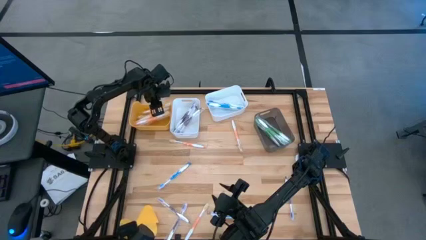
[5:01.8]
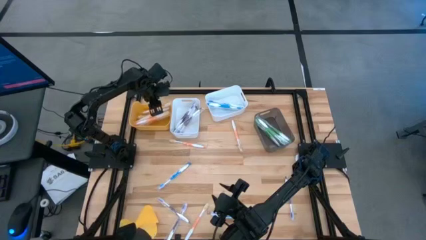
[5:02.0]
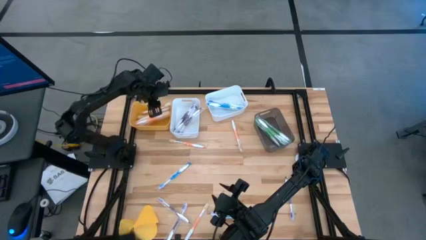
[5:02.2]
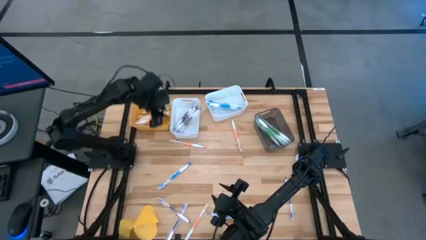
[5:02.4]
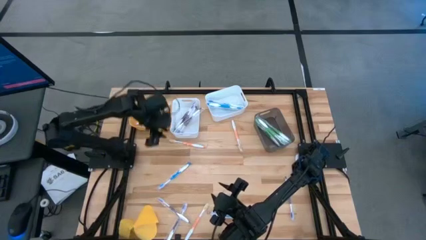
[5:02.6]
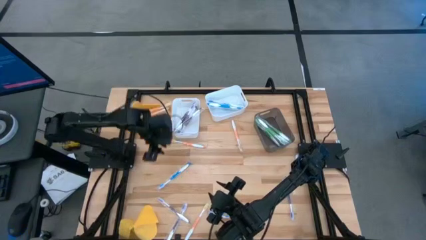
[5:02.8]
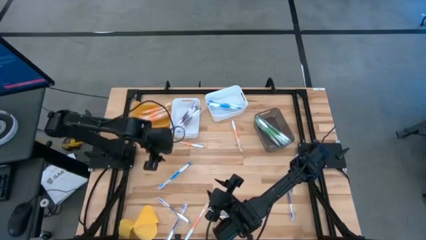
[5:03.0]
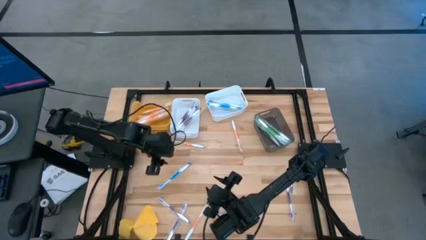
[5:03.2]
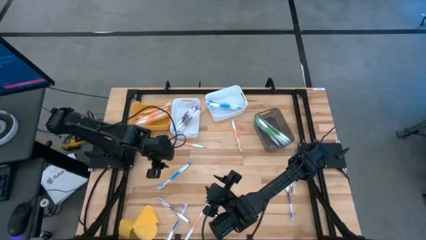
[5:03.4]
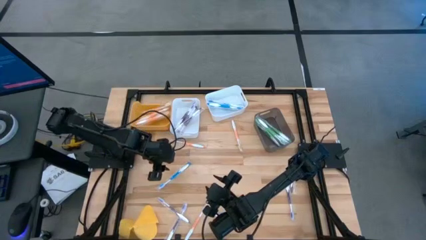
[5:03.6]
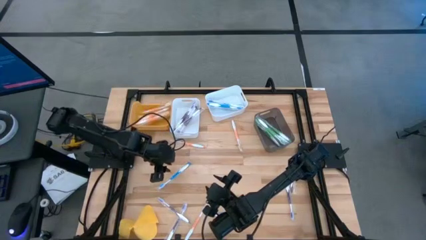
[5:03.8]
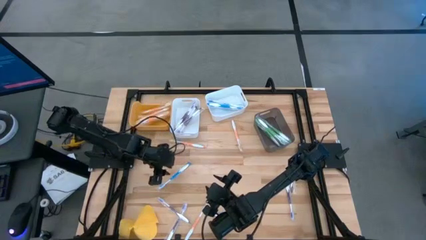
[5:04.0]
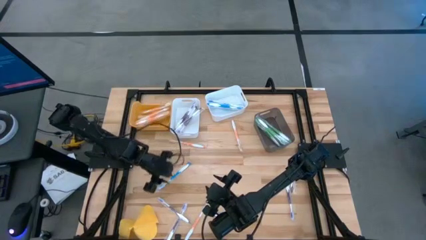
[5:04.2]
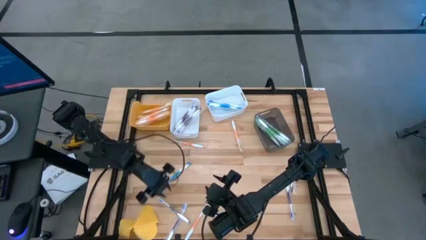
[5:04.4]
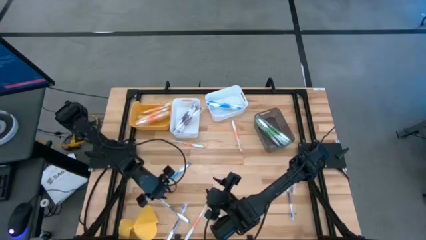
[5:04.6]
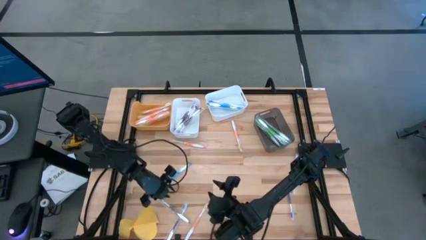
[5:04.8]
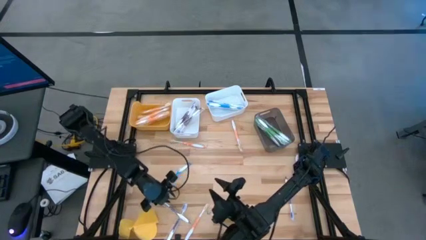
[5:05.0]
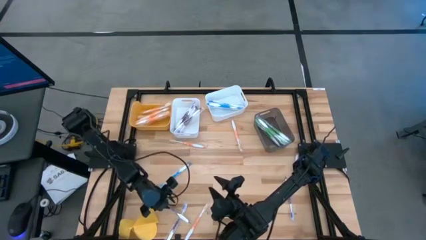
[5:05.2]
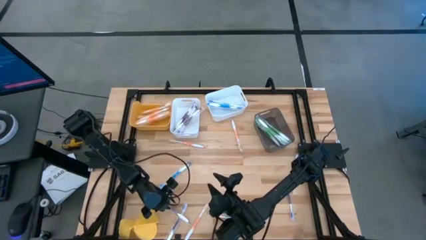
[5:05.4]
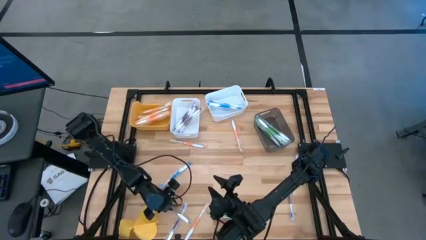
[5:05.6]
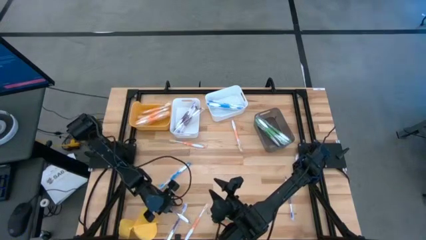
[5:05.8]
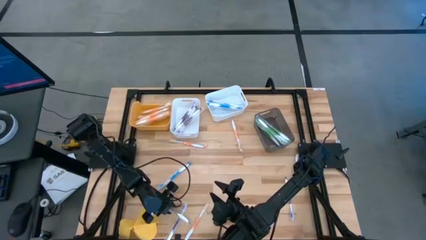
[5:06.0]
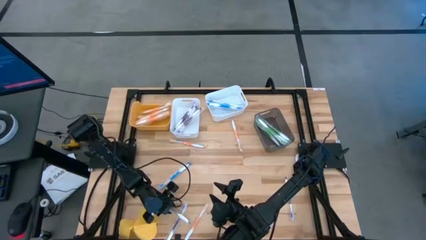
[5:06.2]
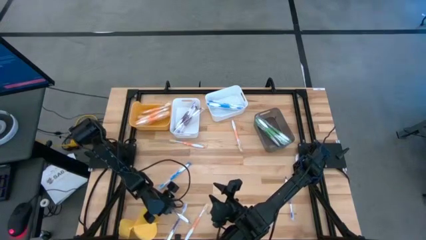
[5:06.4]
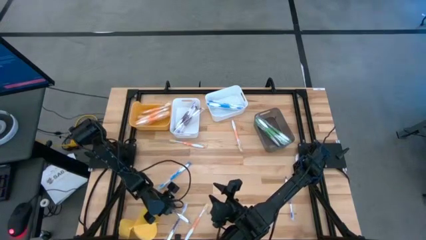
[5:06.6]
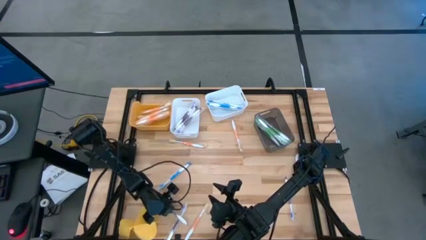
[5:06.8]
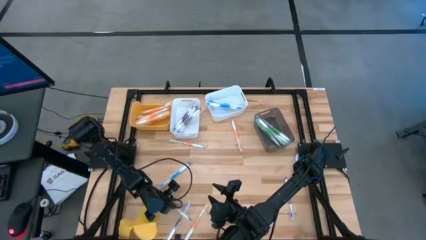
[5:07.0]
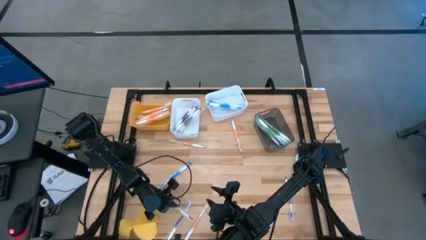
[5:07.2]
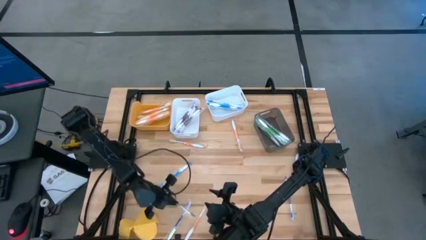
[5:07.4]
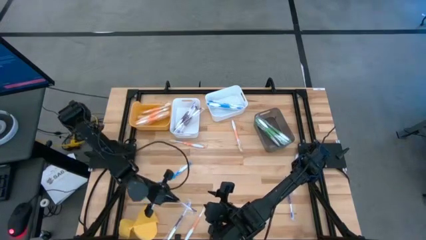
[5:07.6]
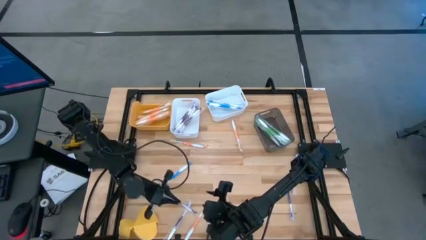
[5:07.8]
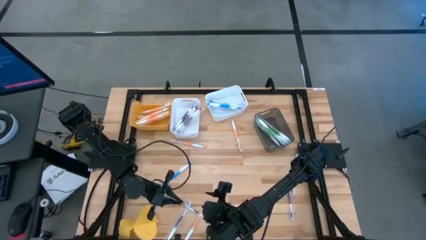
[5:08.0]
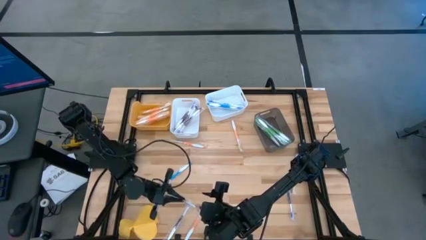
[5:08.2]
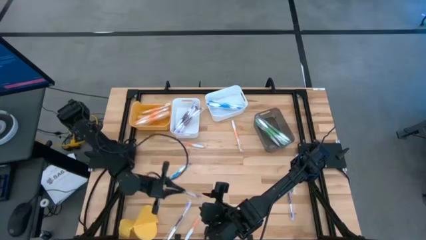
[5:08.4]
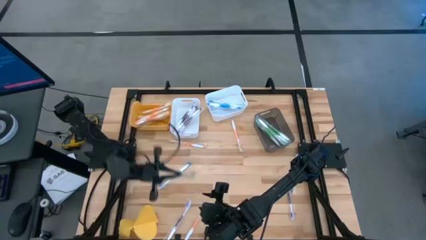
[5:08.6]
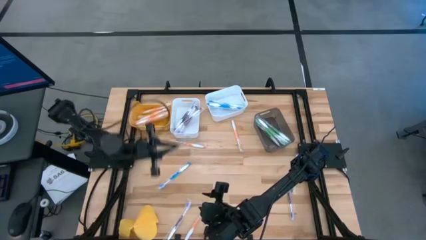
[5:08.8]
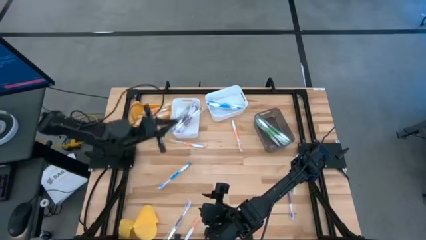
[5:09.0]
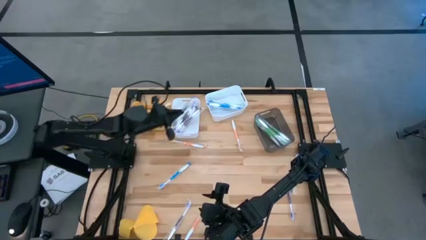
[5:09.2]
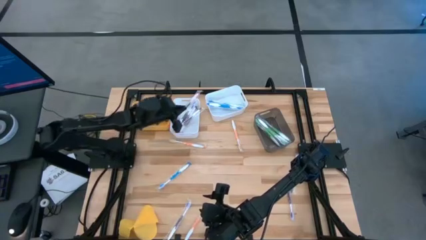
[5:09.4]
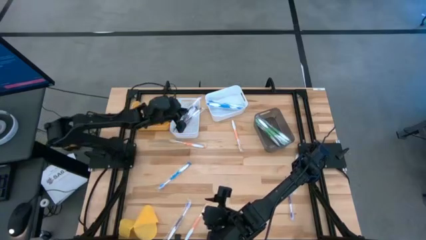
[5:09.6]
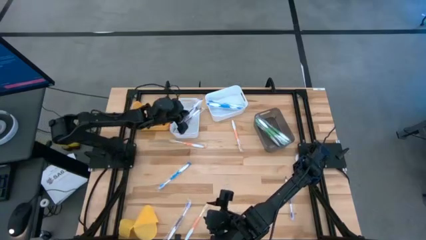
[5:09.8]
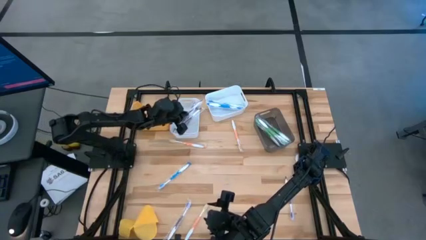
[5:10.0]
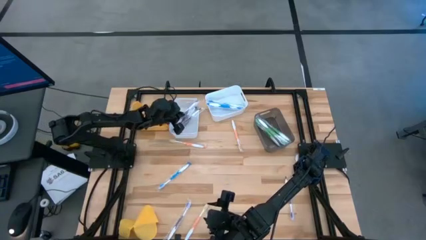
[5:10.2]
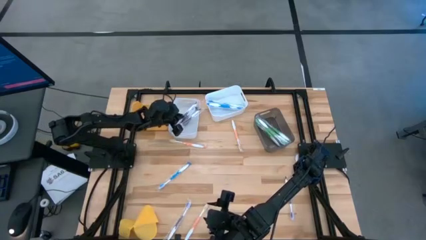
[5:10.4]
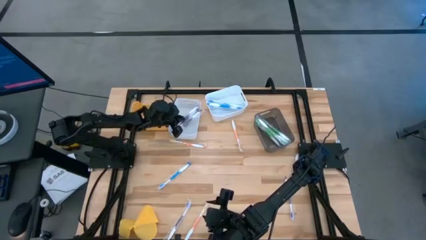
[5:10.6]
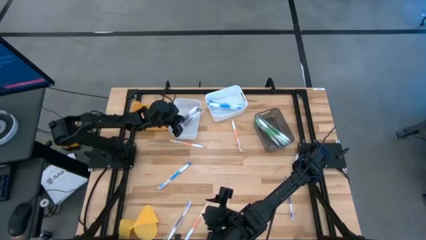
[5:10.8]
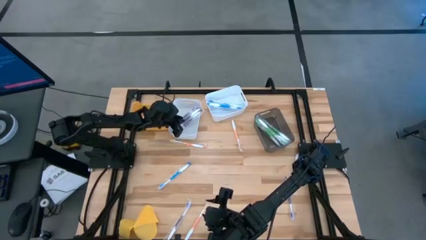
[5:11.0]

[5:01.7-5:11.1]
Task: Pick & Place Toothbrushes
Put the purple toothbrush into the left white bin

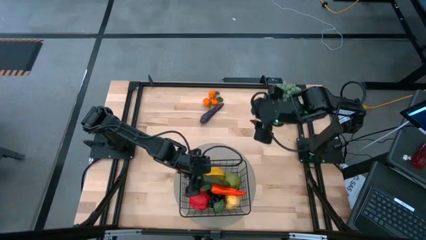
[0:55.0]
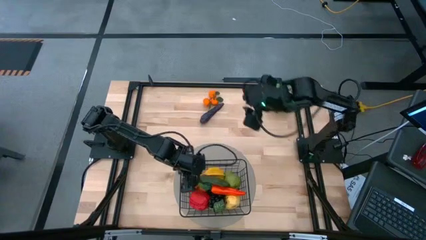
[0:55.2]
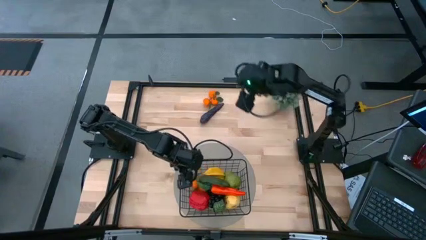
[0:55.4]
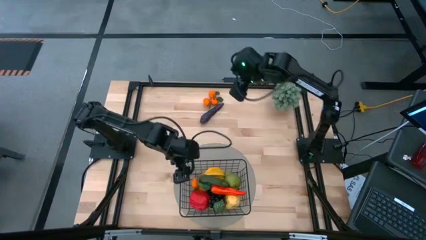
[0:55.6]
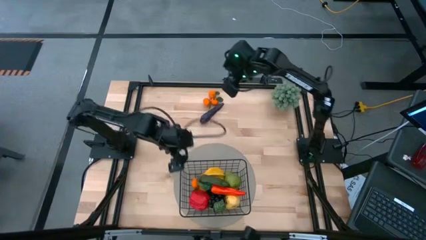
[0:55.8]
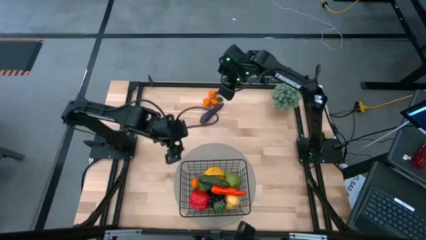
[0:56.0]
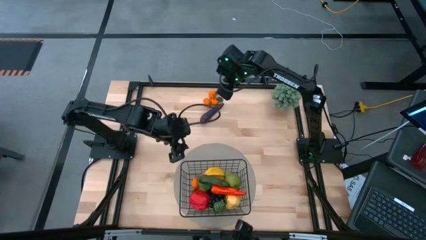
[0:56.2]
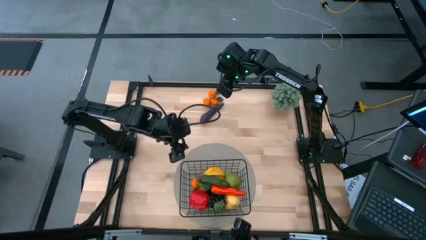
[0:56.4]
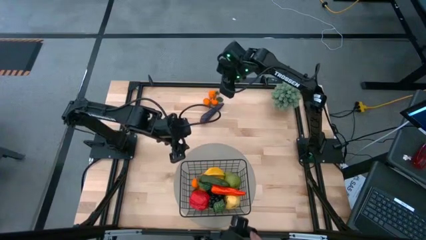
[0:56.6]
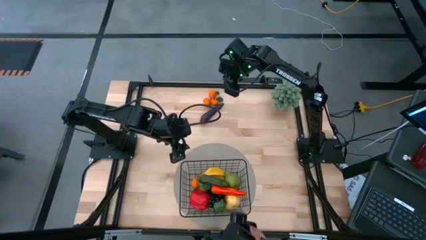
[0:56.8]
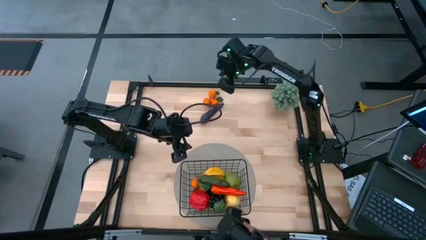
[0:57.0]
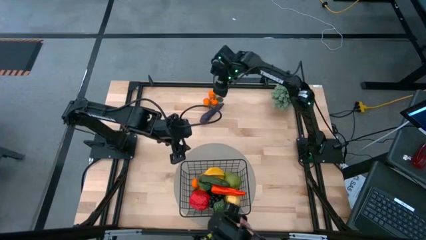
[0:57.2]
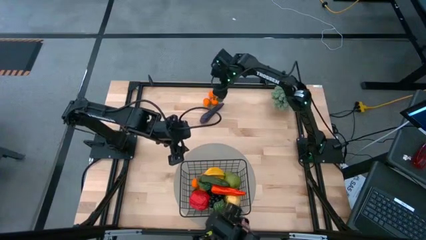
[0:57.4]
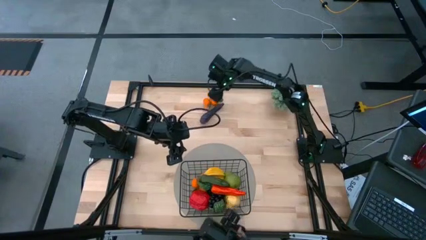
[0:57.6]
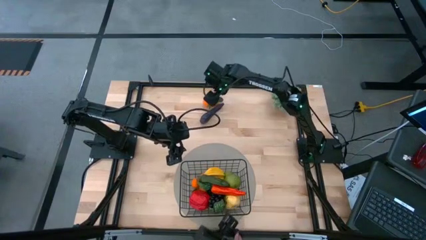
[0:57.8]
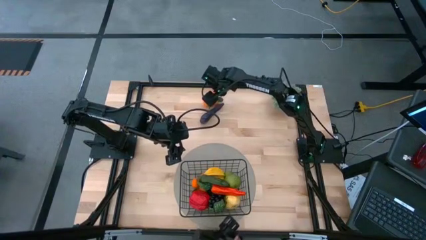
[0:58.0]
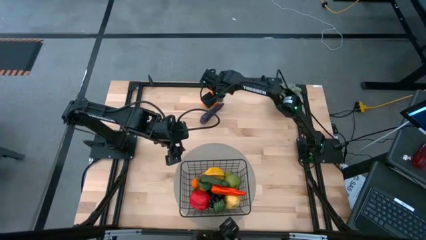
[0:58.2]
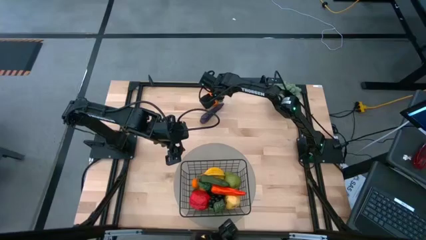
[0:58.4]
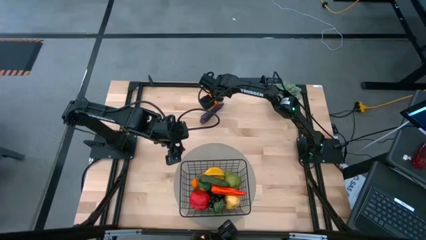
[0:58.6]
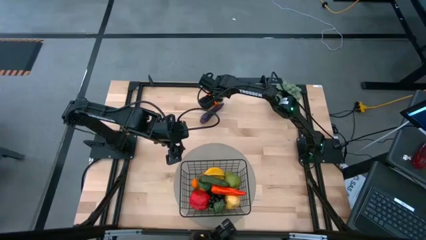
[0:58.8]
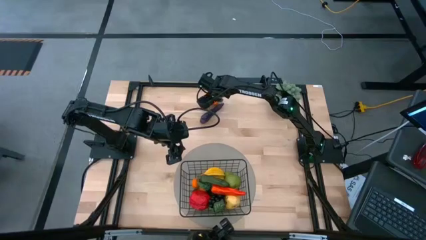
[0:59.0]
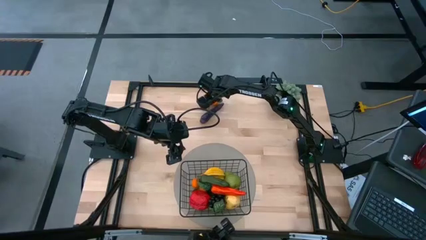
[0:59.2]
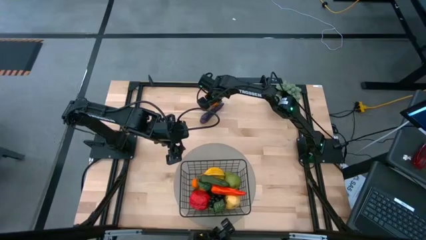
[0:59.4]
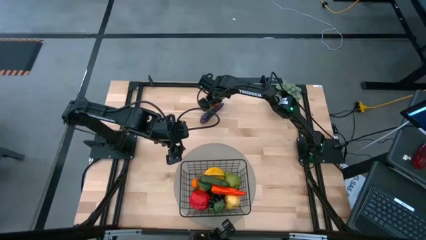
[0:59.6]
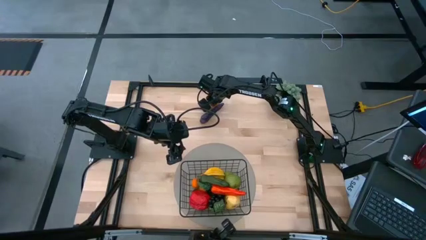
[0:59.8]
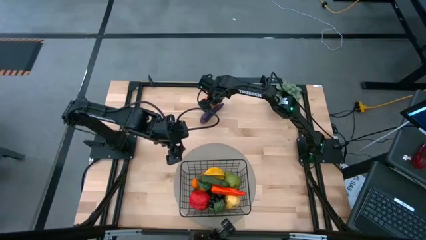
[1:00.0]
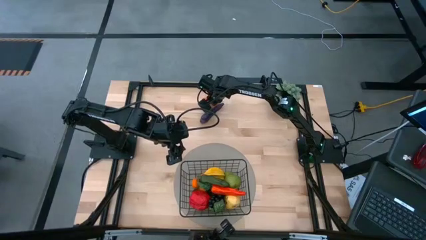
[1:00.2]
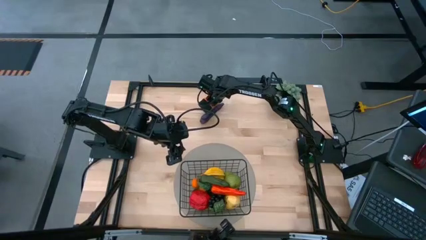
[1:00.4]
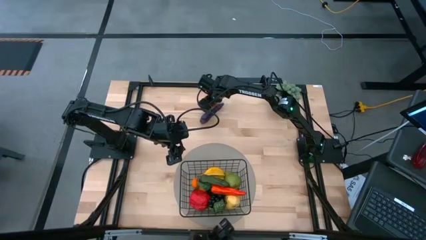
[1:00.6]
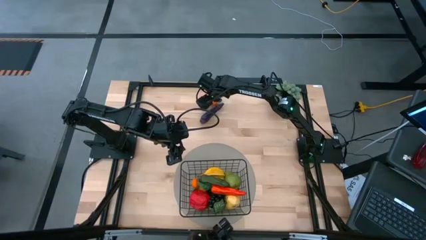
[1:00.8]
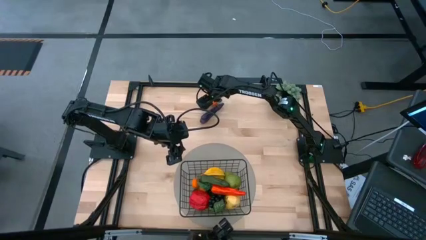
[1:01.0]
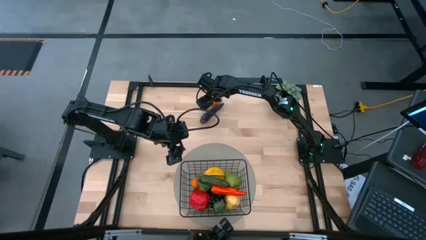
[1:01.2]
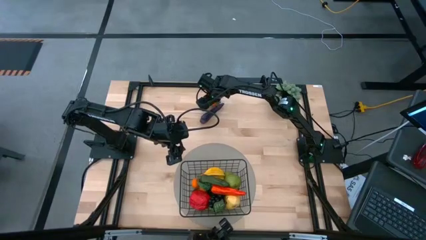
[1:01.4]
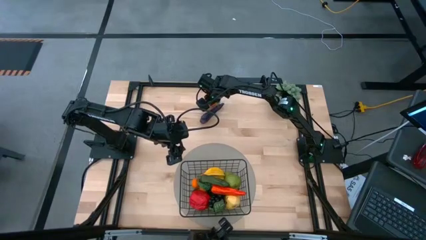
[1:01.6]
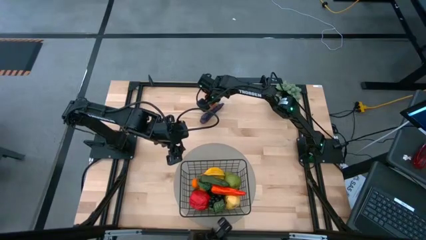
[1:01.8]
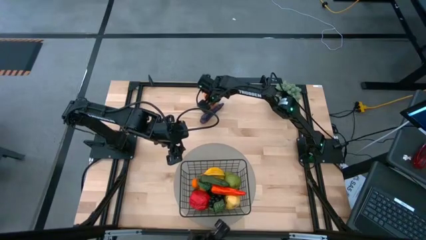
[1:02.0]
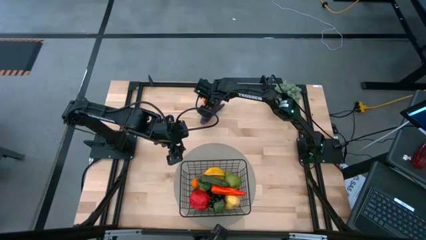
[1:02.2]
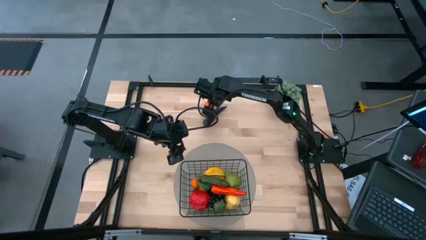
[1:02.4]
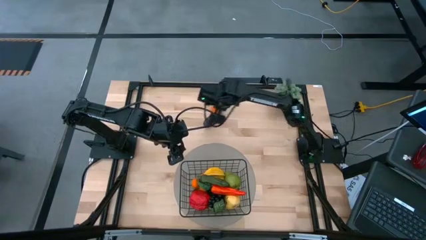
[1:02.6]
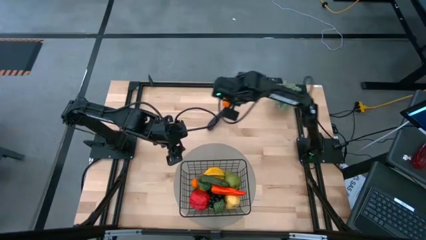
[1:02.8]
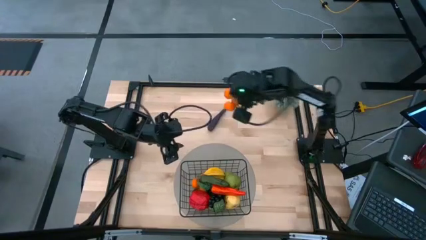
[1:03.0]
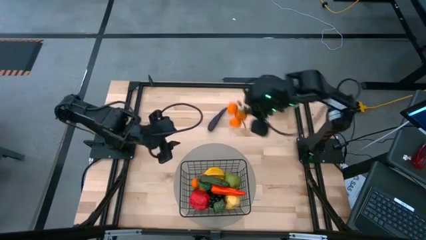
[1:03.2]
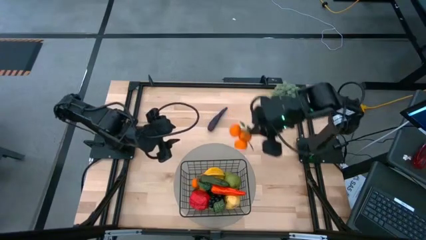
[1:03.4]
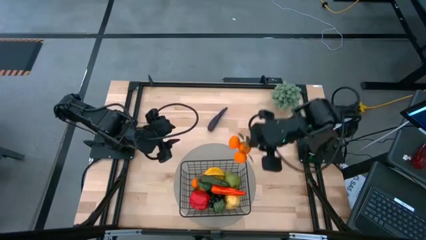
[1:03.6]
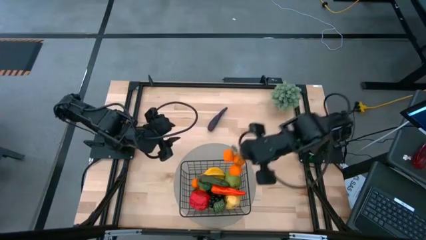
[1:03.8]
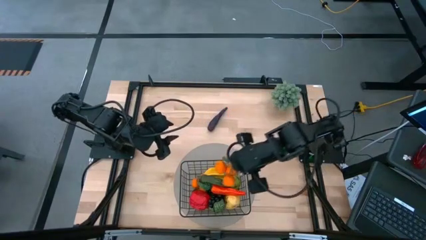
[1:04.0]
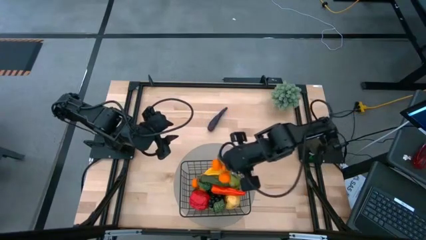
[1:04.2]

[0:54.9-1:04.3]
Task: Build produce basket
Put the tangerines into the black wire basket
